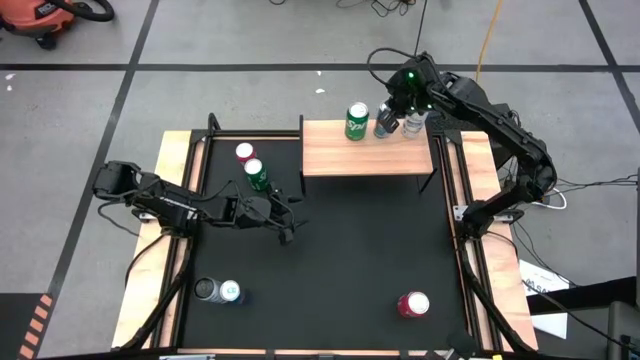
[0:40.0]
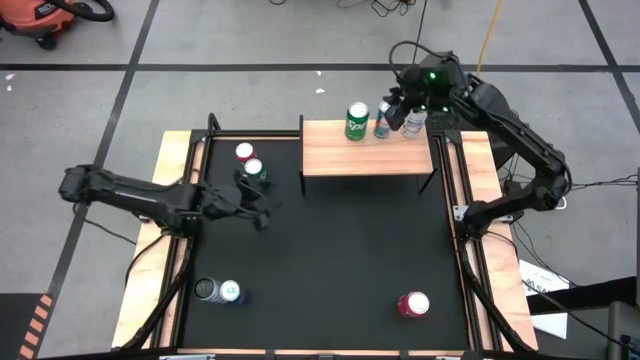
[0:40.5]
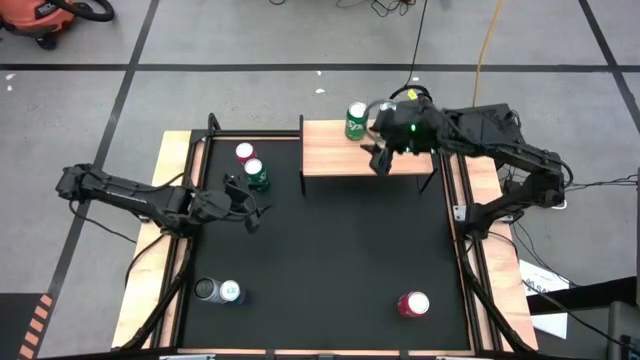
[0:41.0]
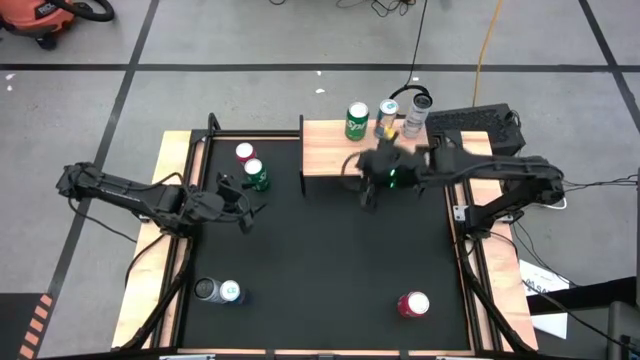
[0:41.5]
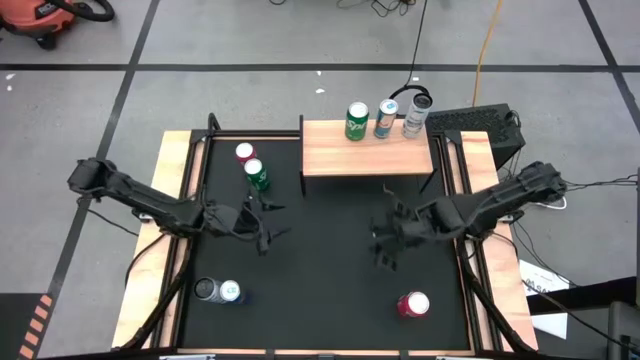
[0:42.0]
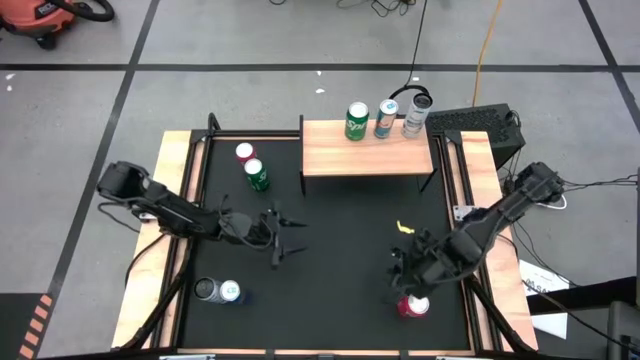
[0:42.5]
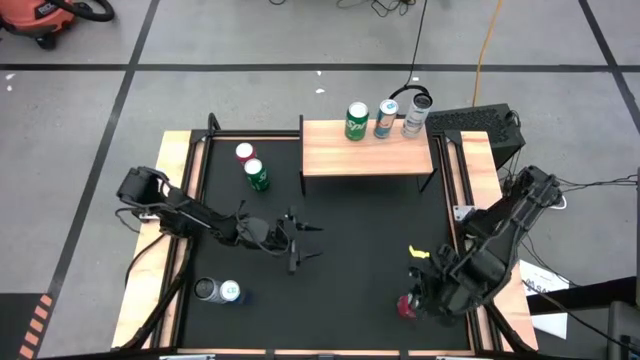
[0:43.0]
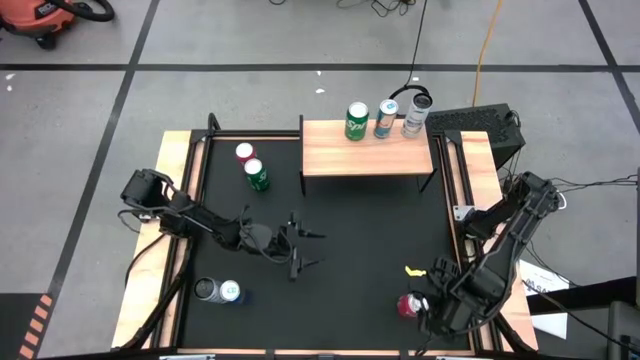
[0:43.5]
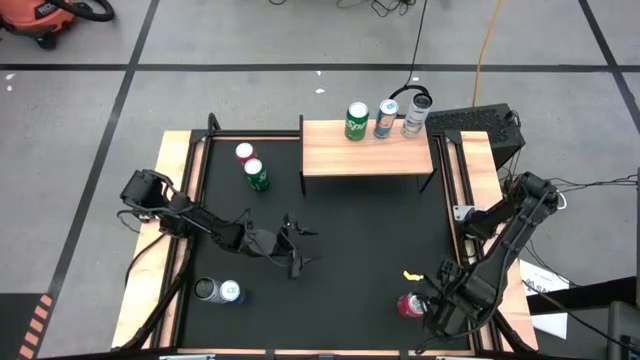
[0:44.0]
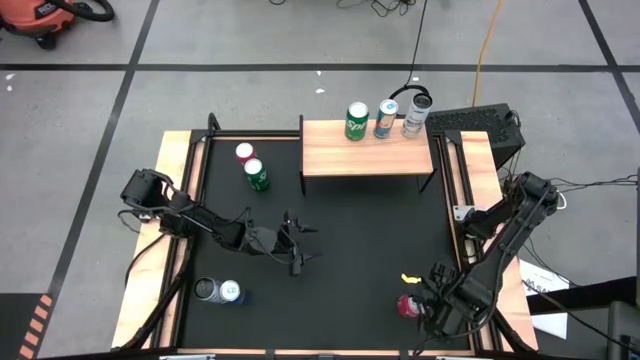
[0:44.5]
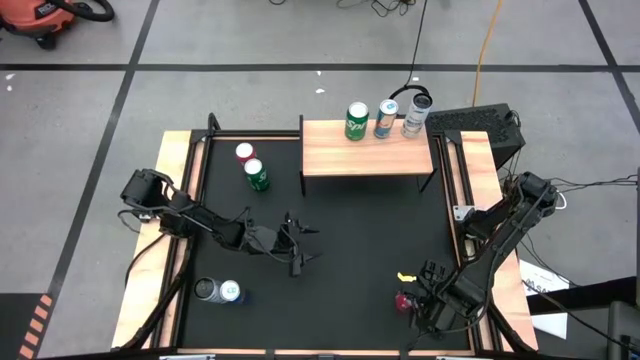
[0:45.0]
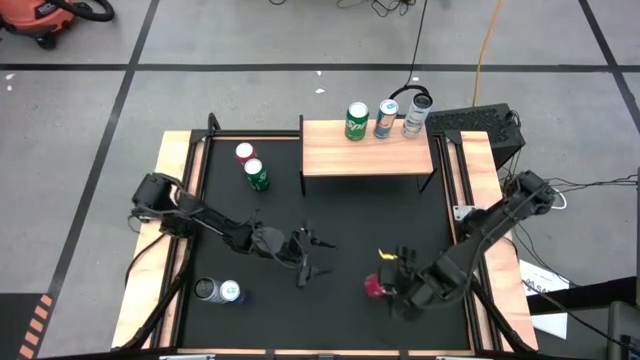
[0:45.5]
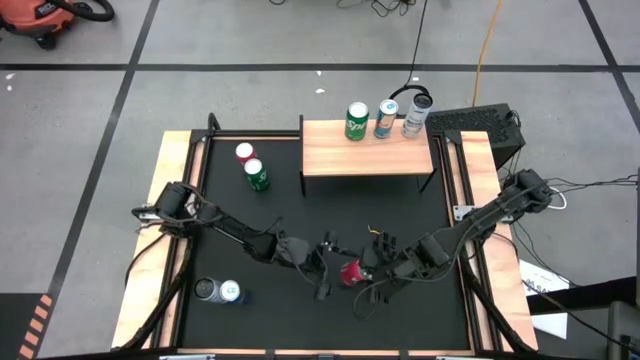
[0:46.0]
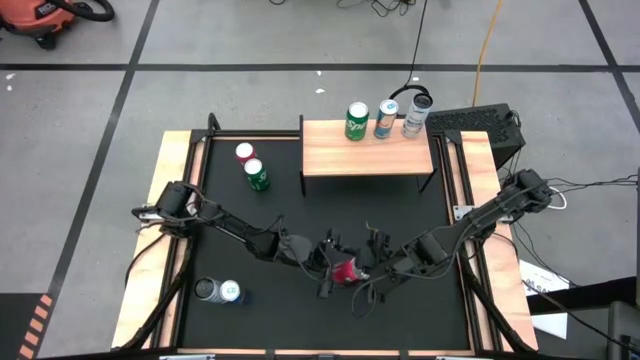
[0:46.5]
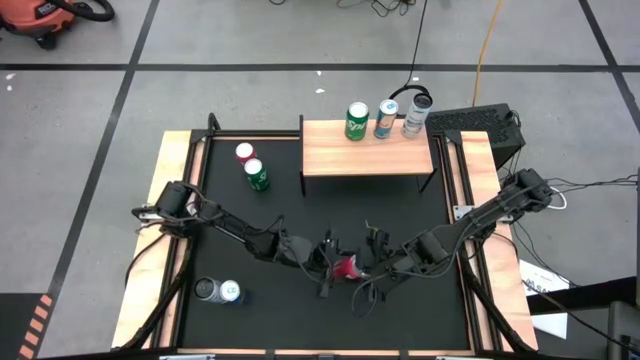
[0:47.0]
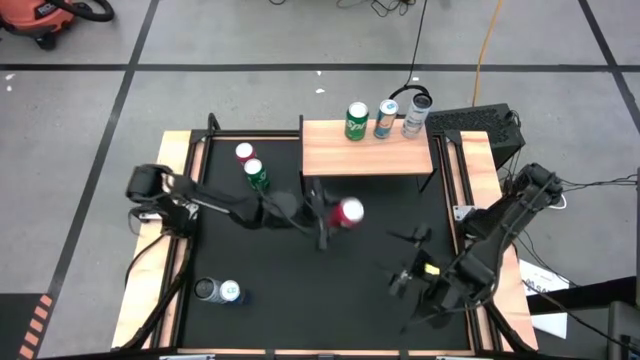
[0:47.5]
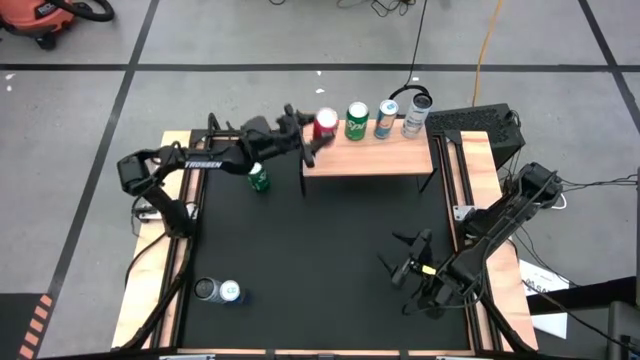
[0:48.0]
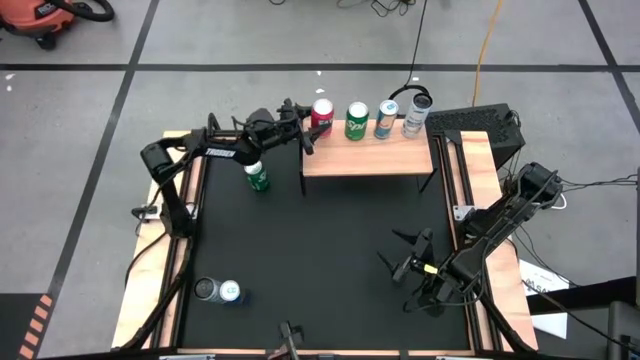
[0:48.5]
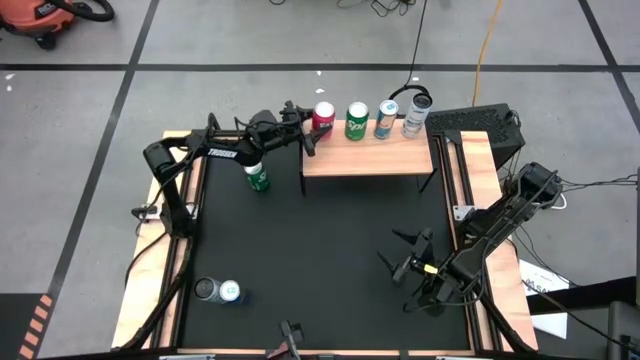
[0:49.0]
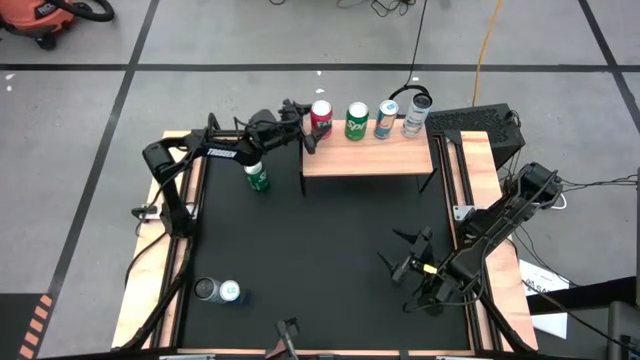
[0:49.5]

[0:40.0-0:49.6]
Task: Place canned beverage on shelf
Put the bottom red soda can on the shelf

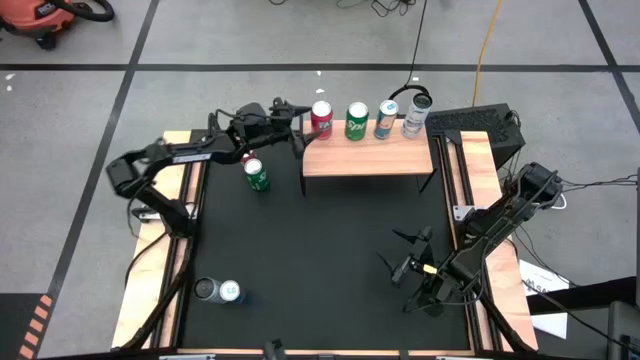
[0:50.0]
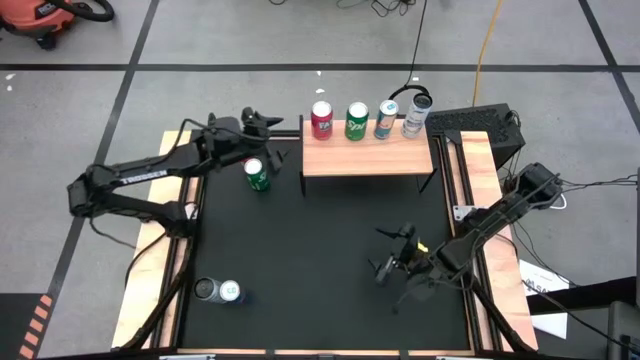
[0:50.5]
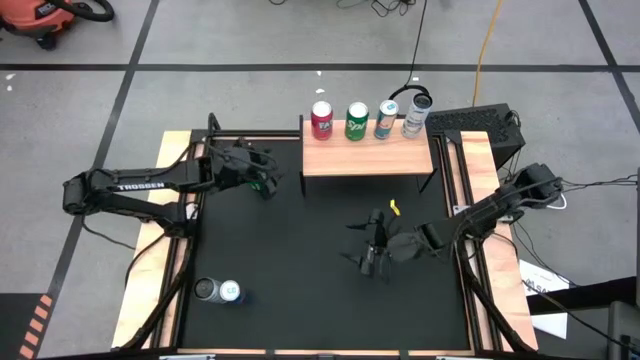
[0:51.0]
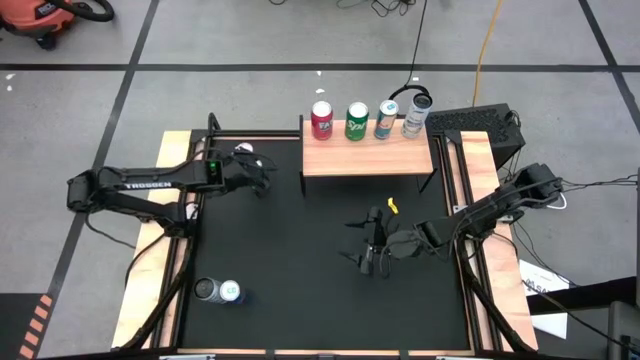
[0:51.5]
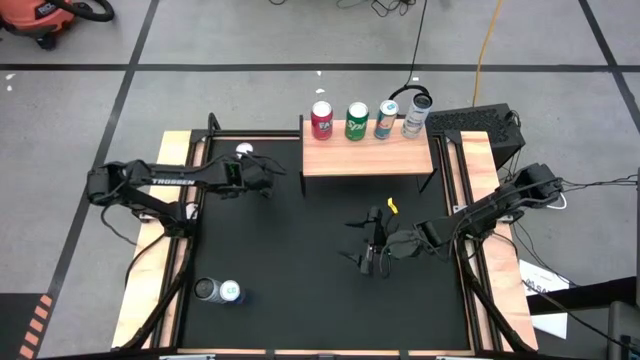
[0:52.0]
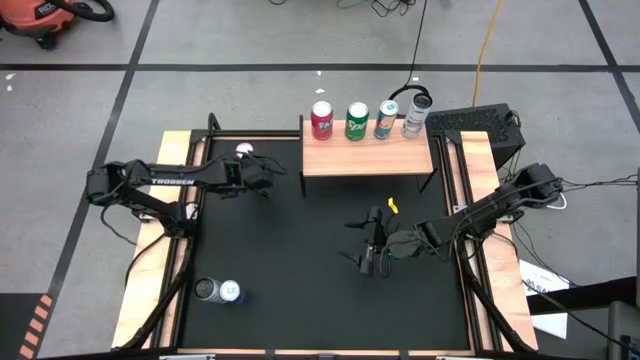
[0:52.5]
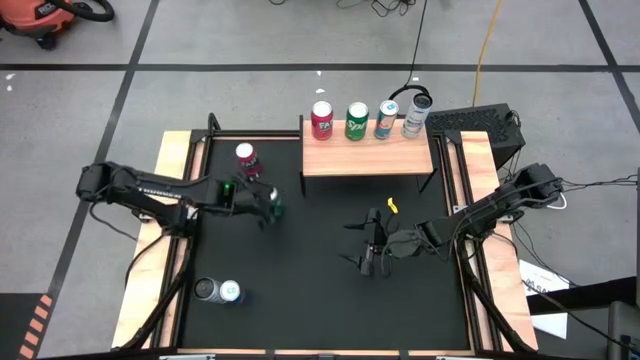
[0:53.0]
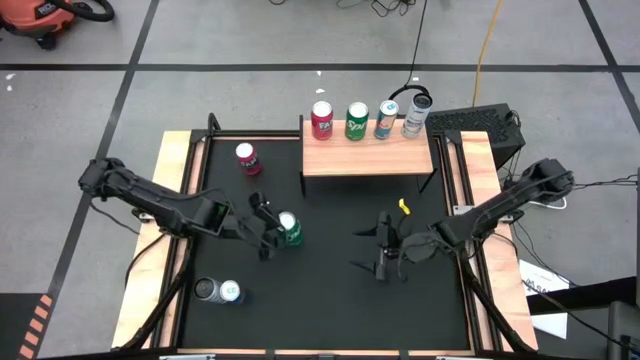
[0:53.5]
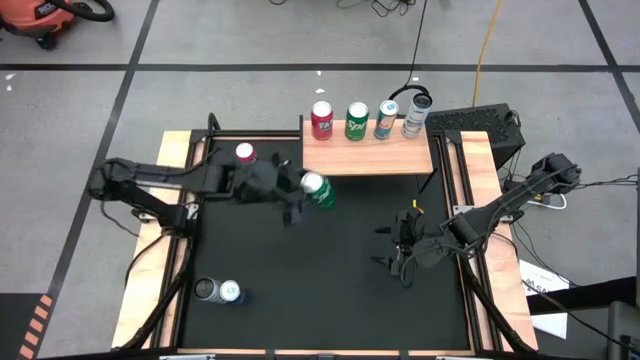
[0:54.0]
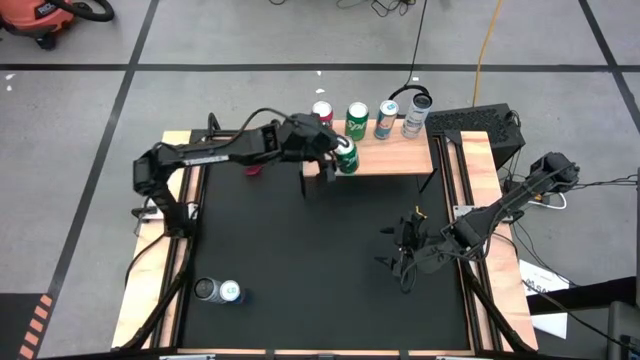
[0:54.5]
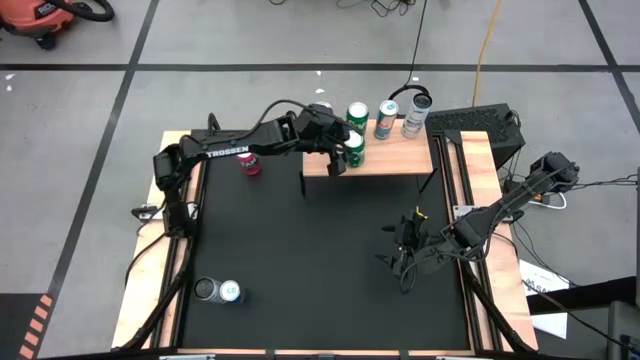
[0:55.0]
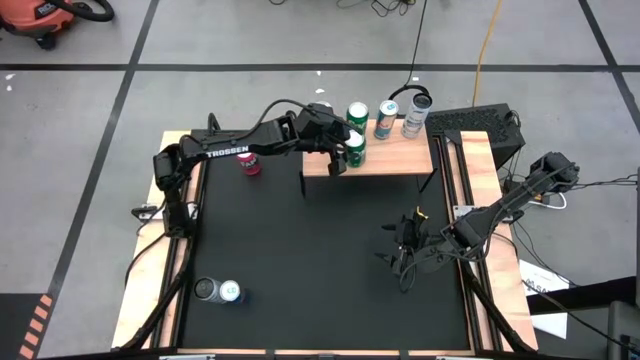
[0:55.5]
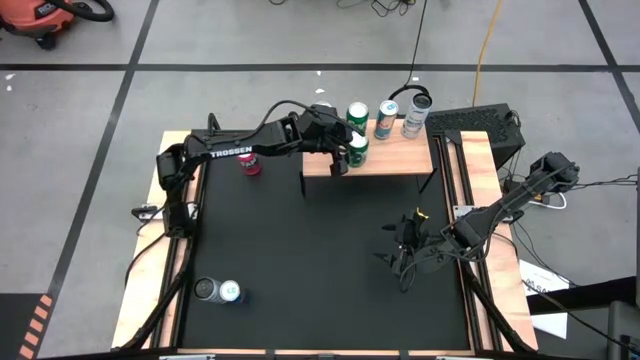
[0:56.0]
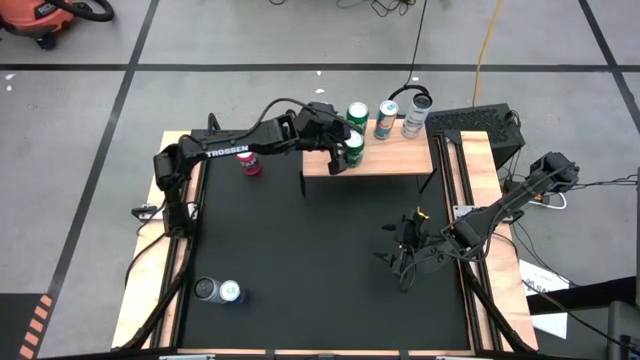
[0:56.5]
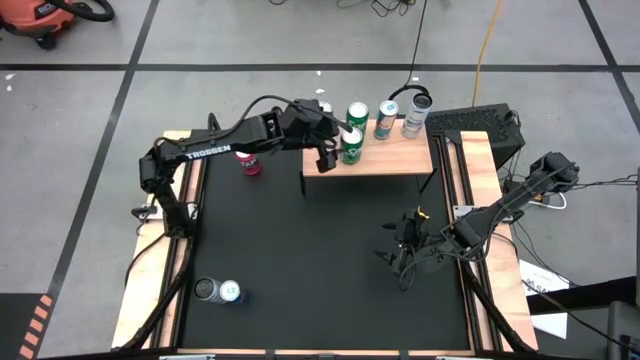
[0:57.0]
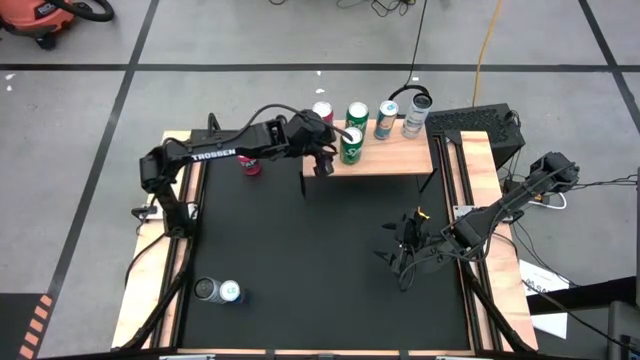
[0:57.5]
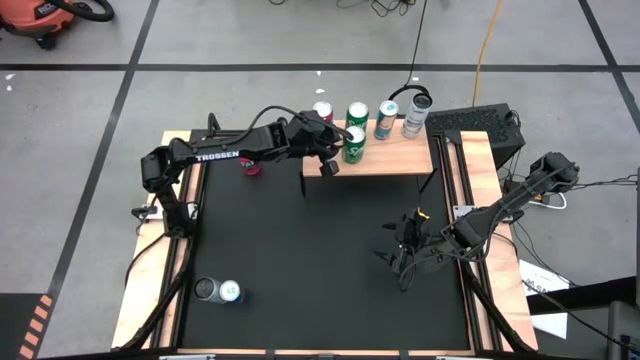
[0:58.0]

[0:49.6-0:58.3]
Put the green soda can on the shelf aligned with the other green soda can

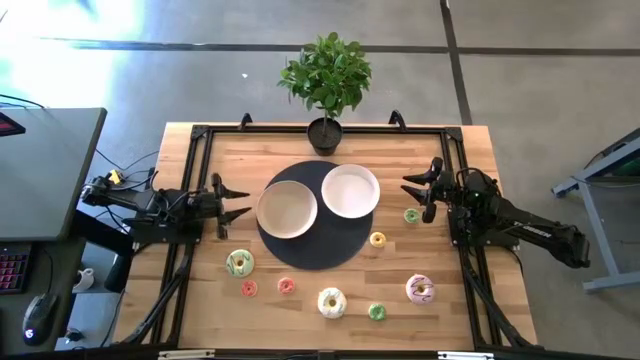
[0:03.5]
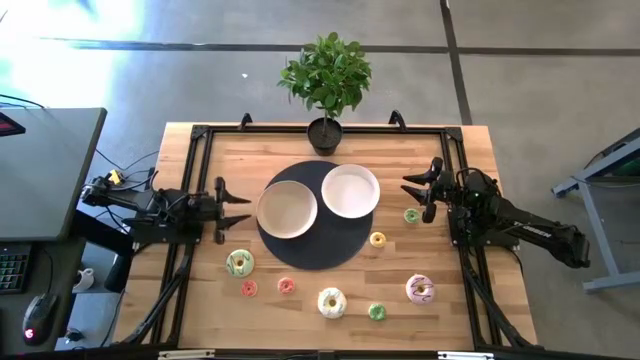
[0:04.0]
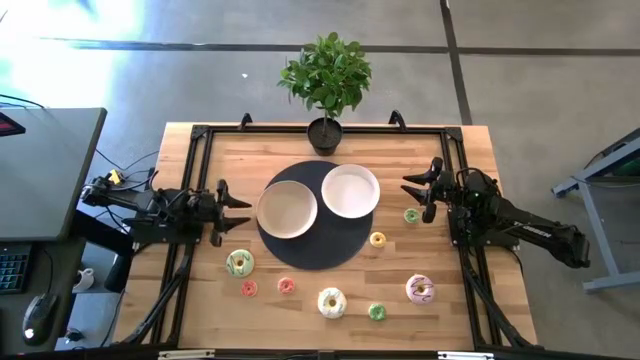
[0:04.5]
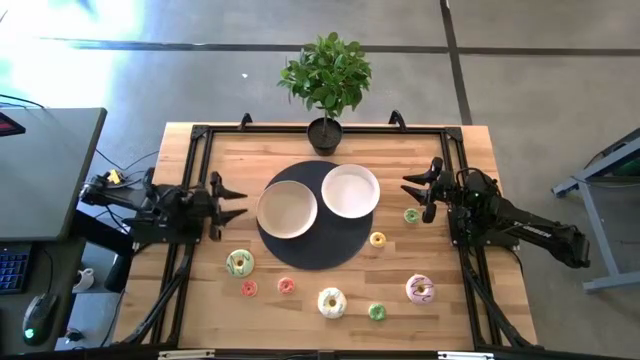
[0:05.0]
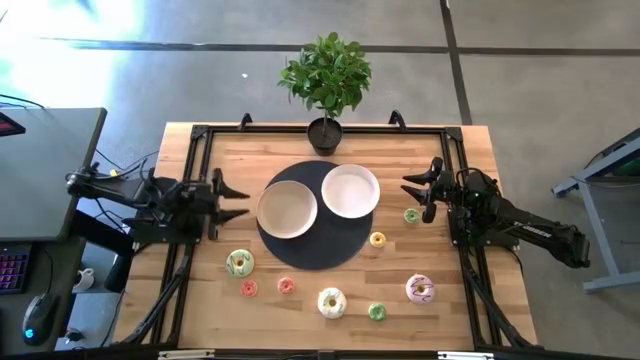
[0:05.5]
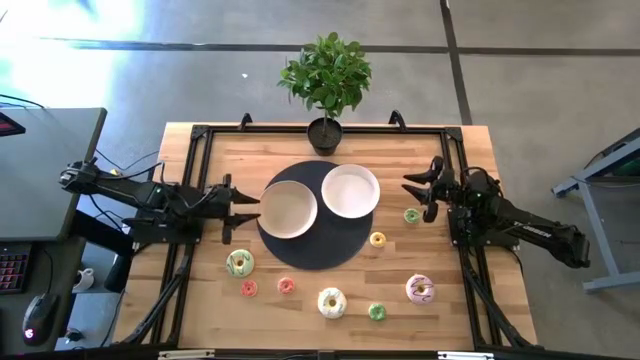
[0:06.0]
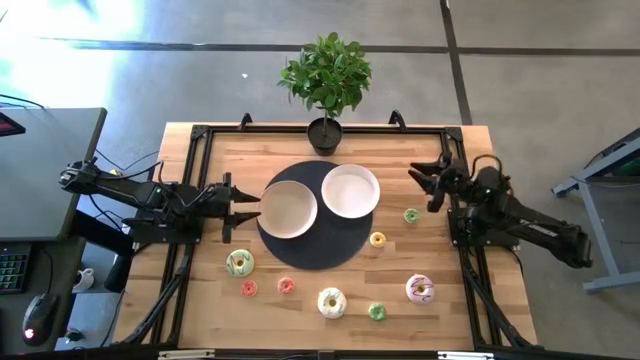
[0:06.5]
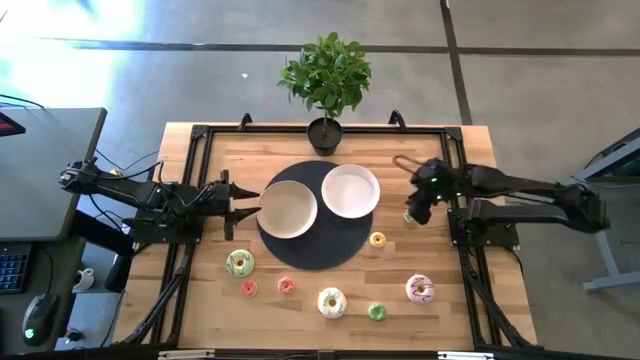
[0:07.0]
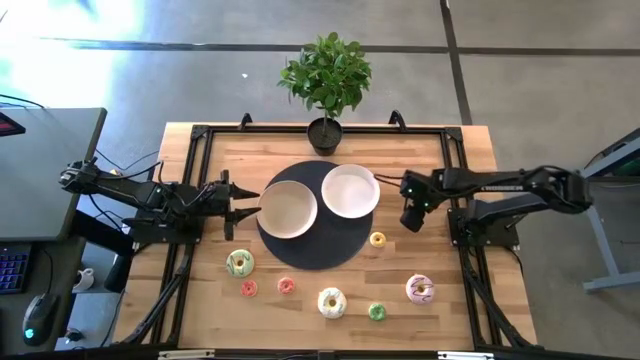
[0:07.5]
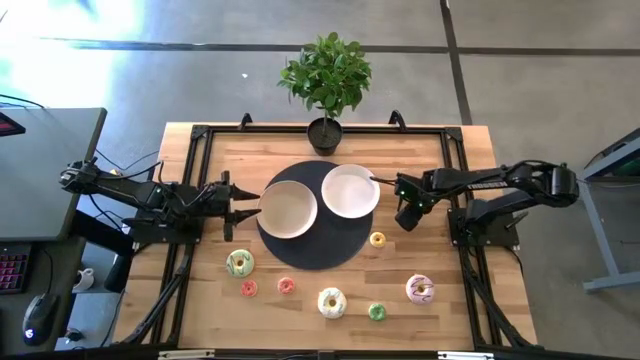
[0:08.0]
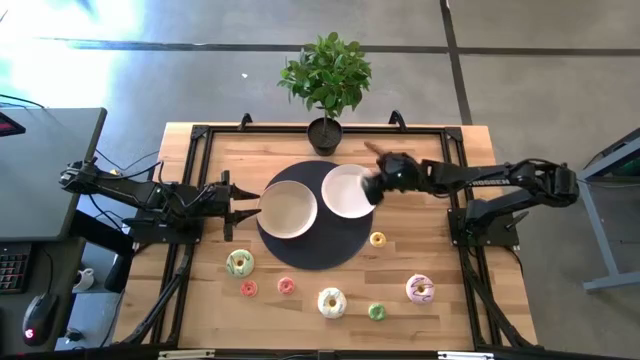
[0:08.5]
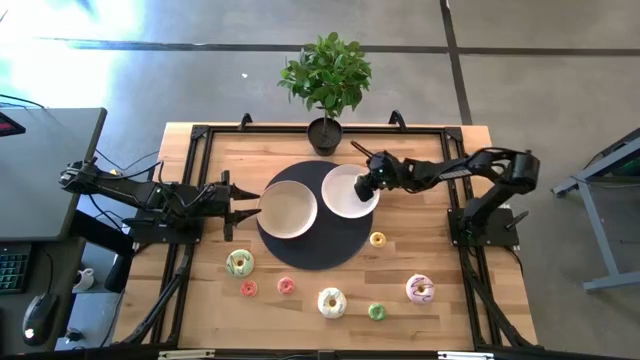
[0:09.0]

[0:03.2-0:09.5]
Task: Pick & Place donuts
Put the small top green donut on the right white plate
